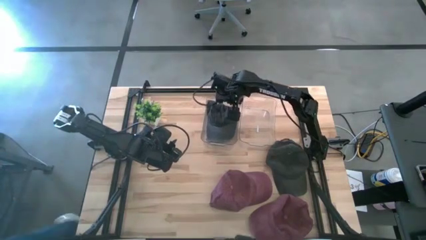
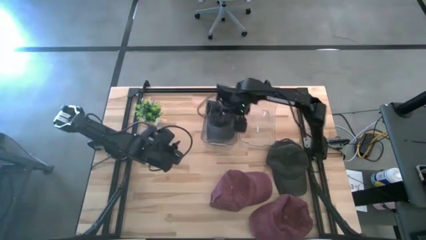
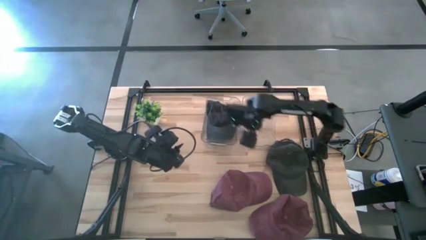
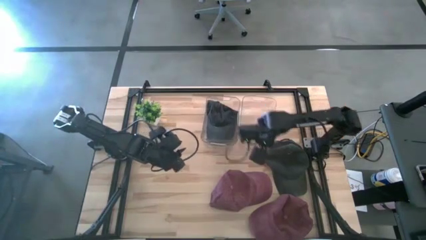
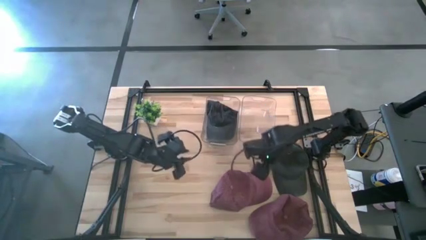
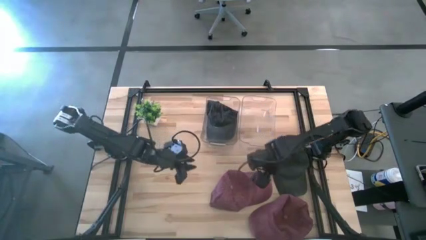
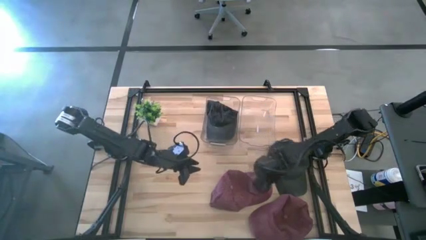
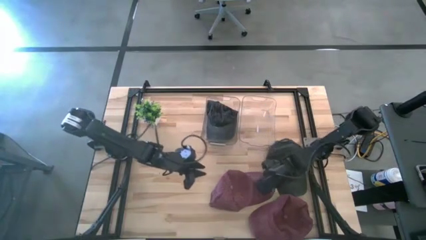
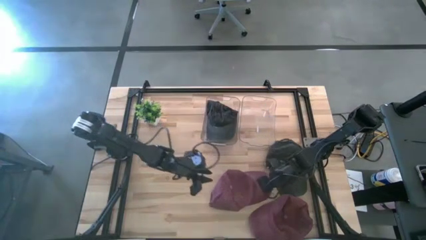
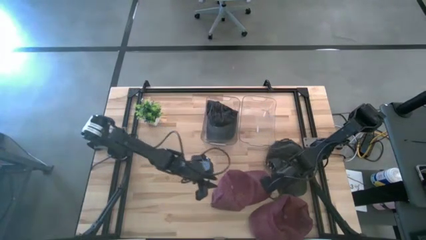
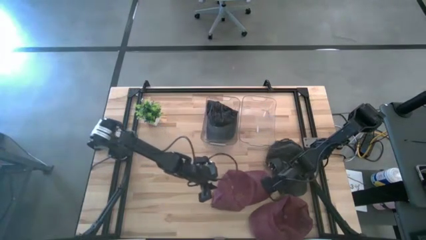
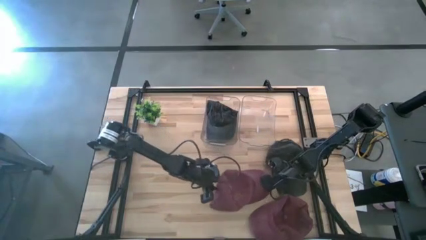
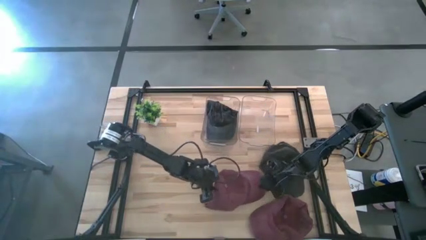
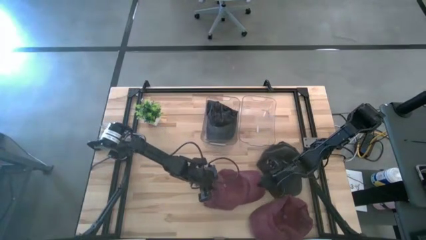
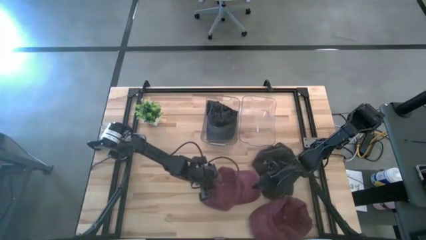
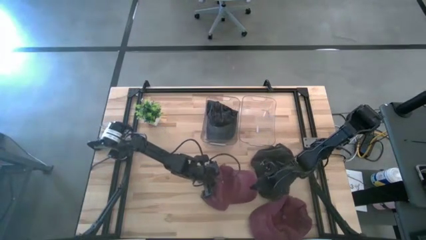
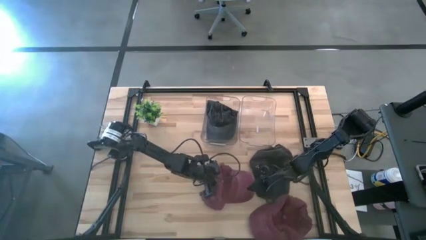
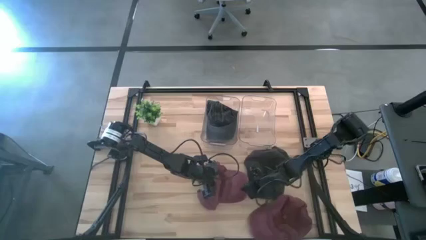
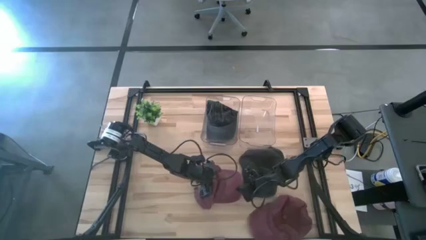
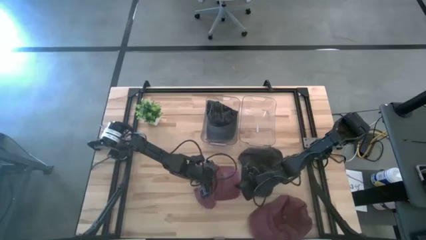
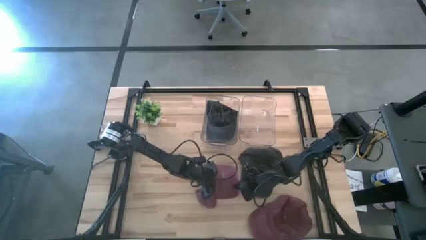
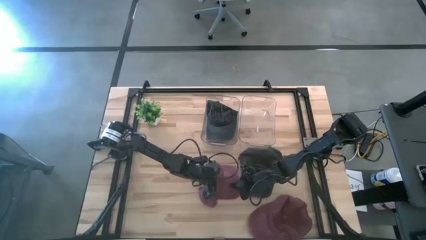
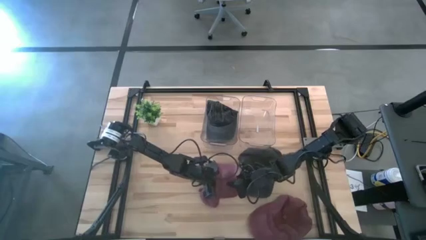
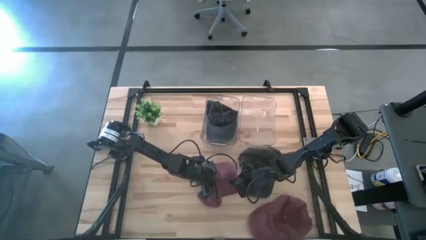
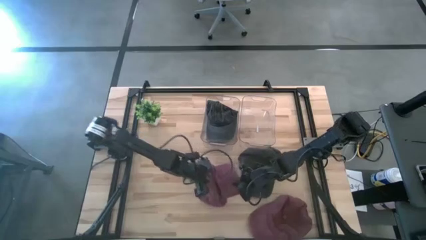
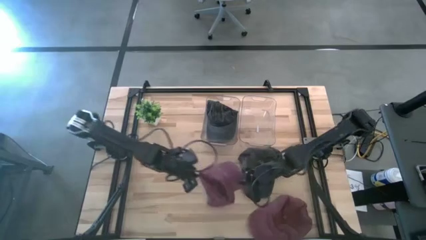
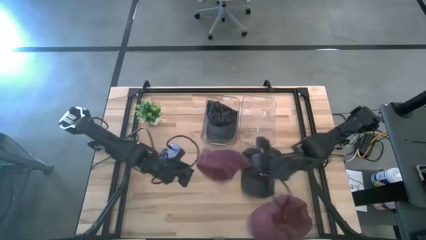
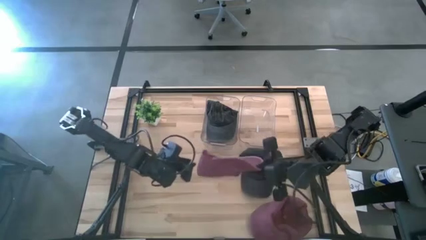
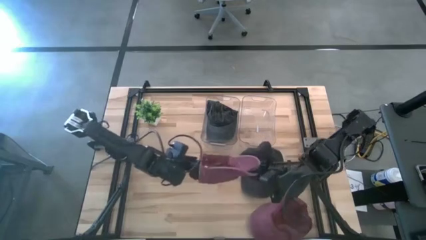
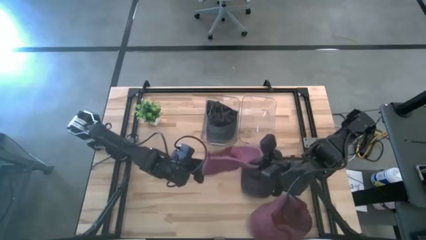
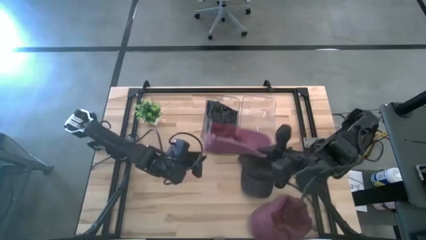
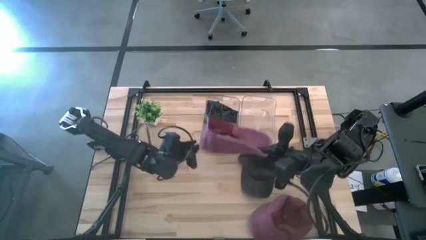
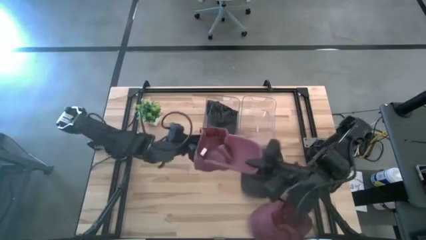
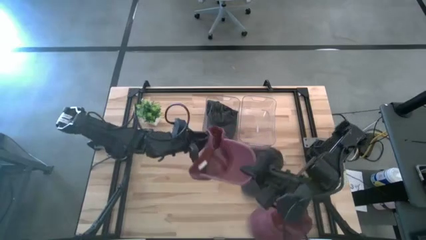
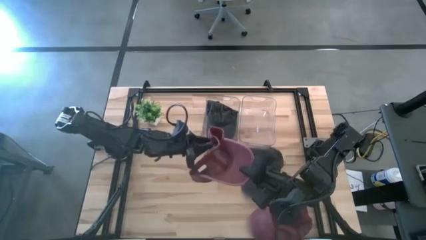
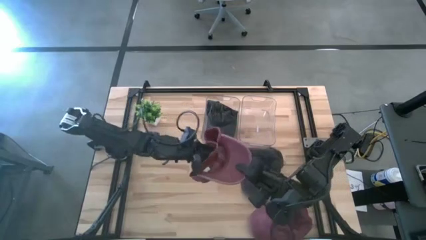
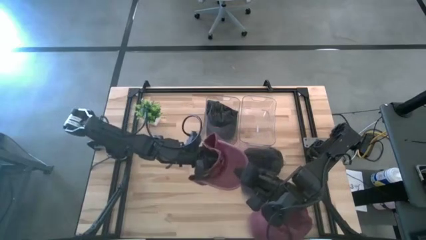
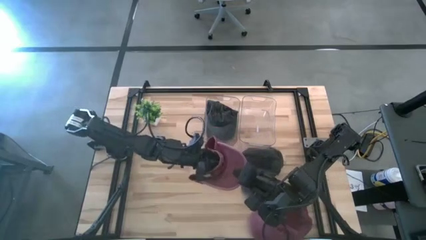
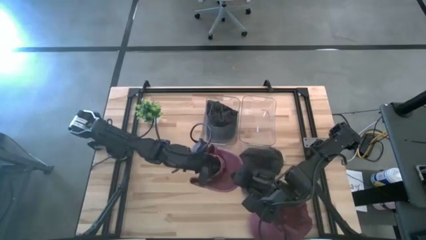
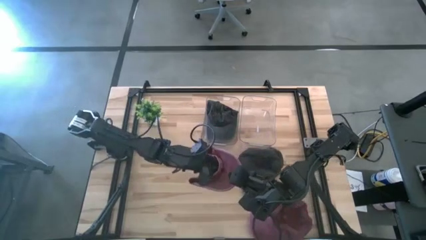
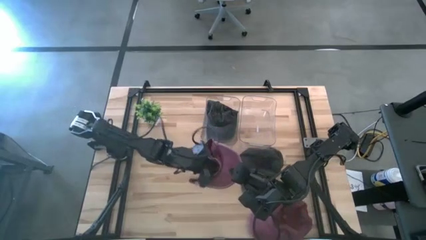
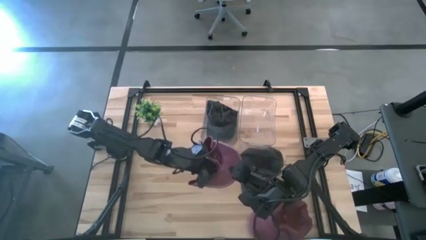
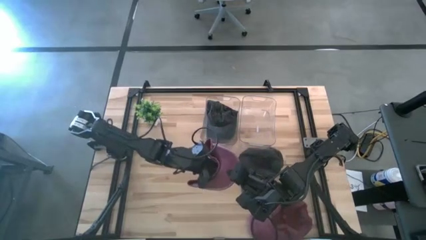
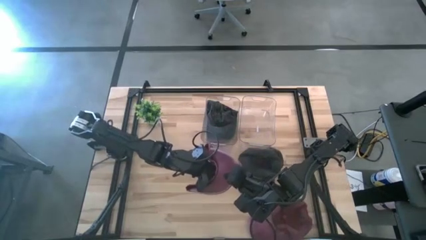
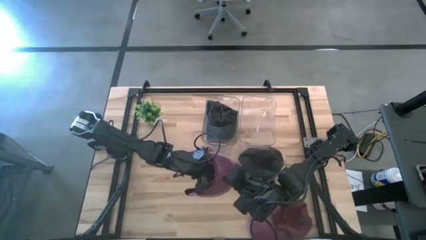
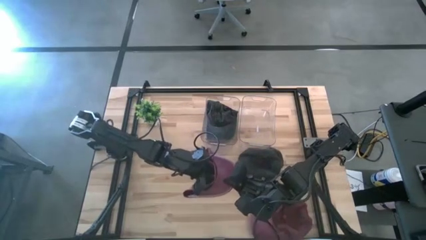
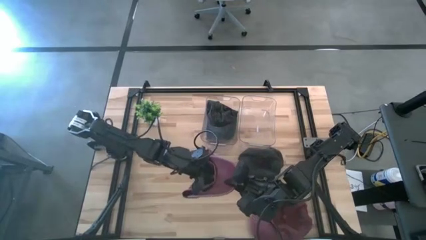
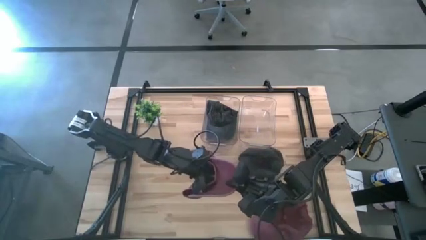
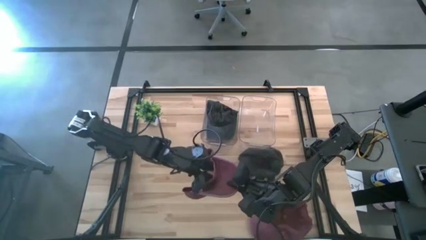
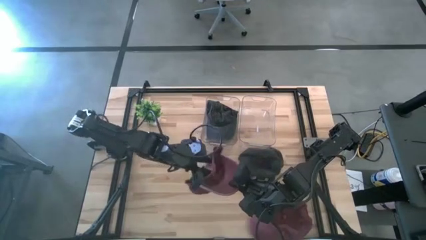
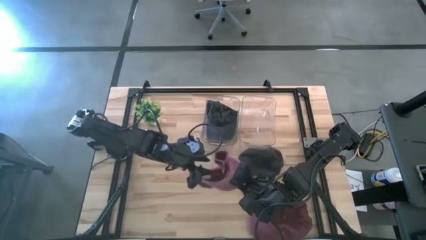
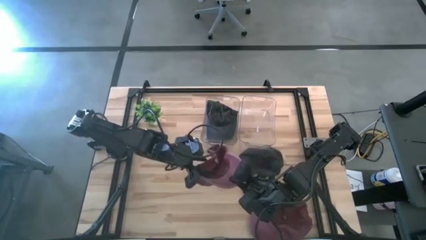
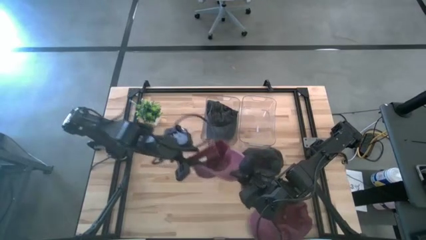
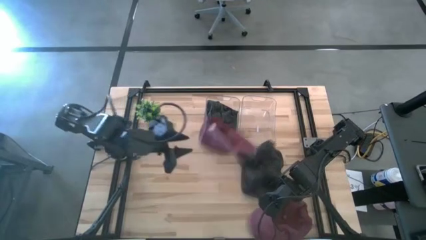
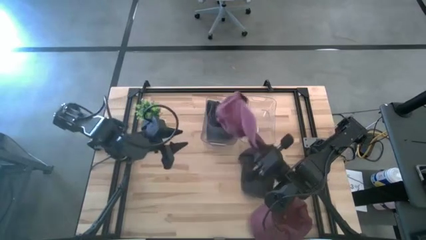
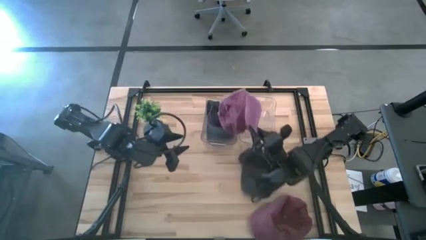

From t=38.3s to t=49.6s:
Task: Pick & Place hat
Put the red cap into the right transparent bin

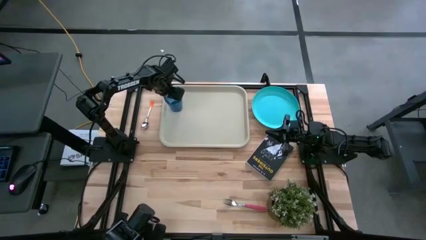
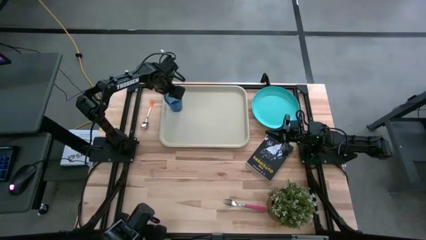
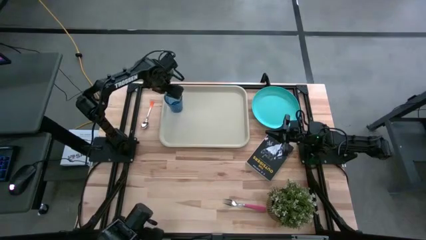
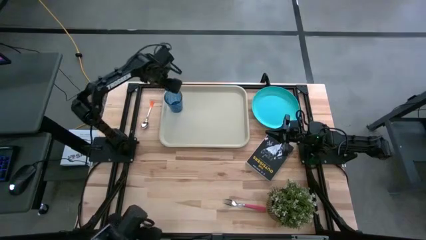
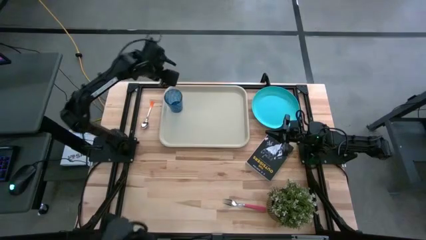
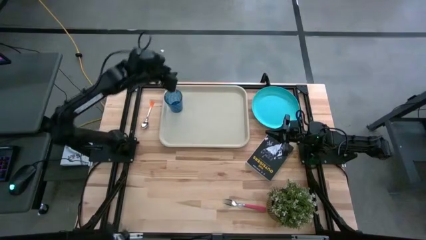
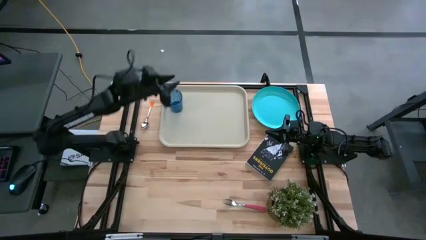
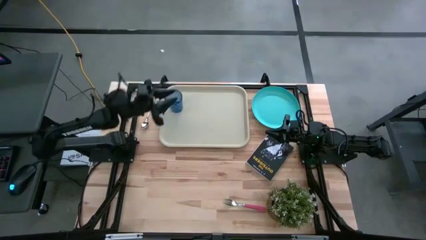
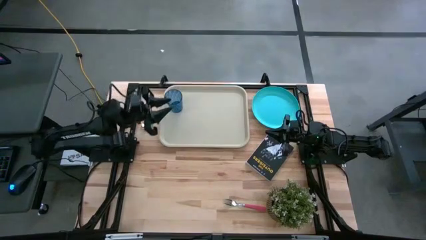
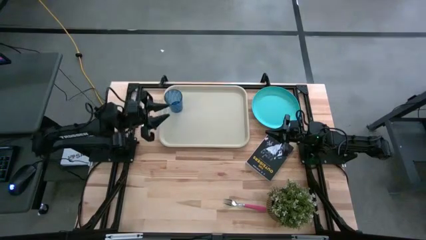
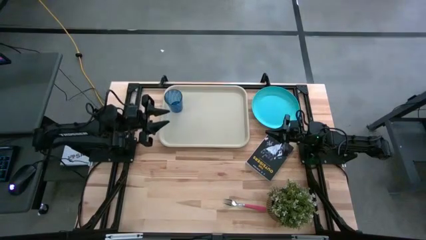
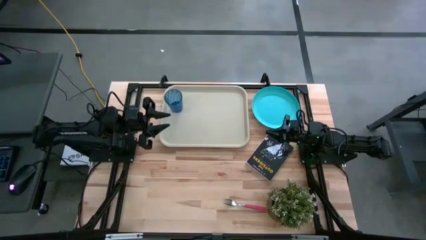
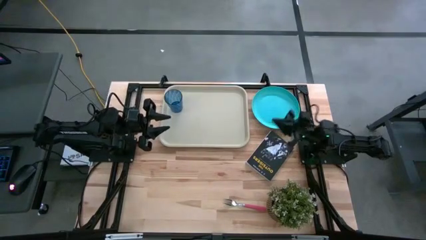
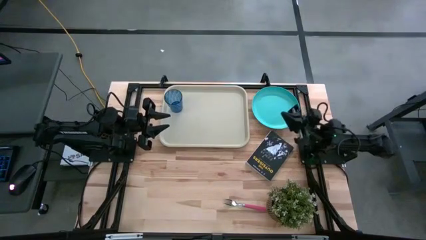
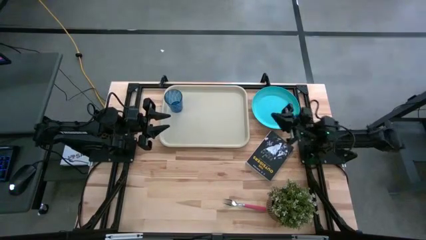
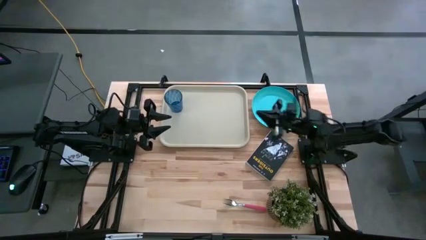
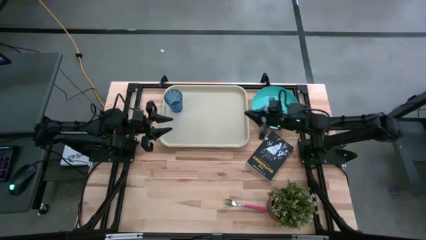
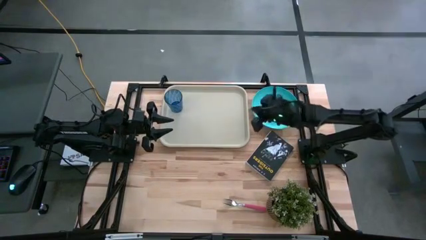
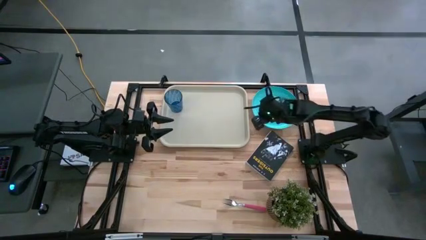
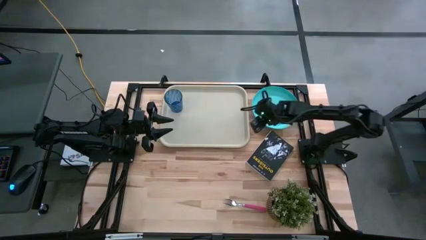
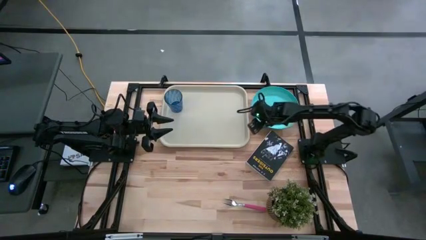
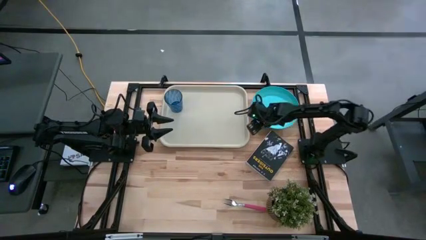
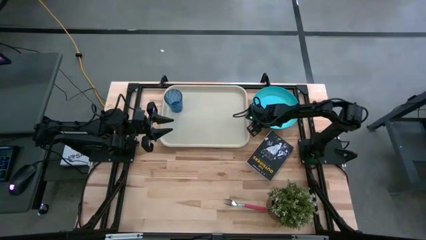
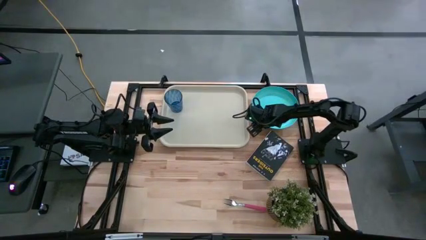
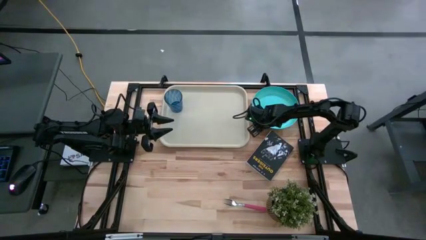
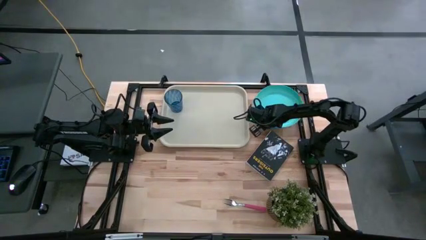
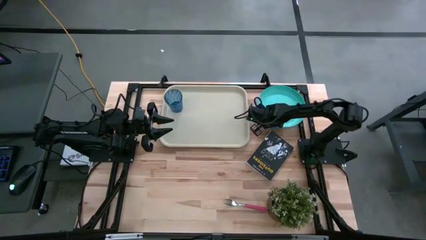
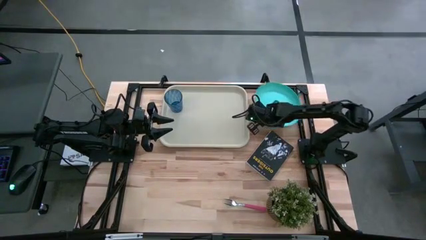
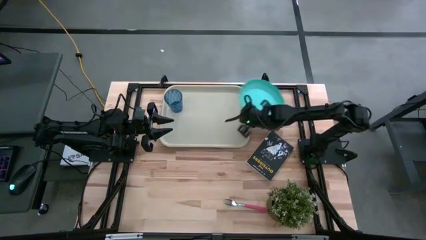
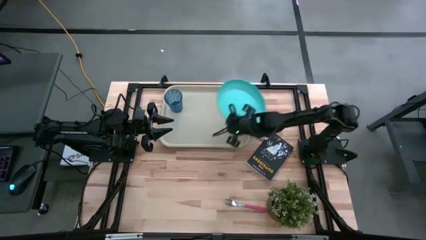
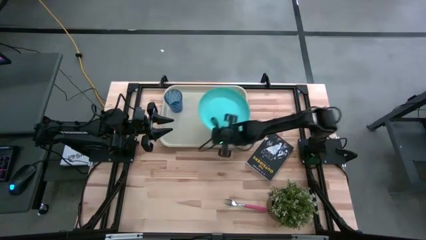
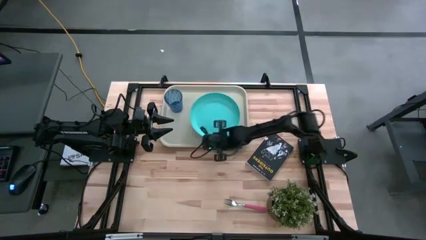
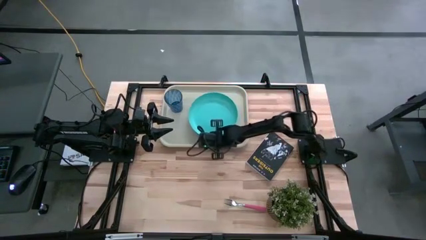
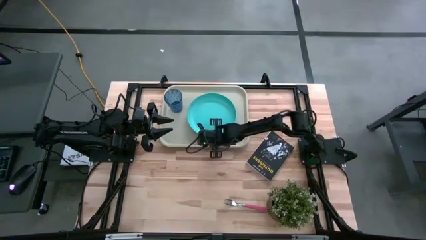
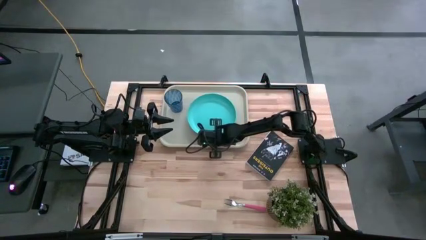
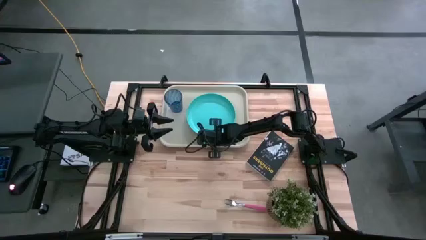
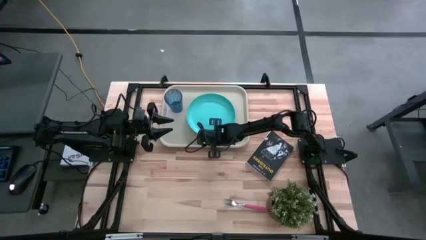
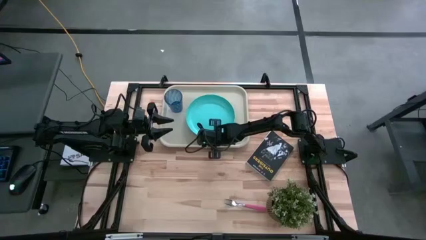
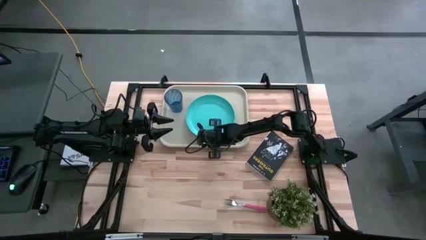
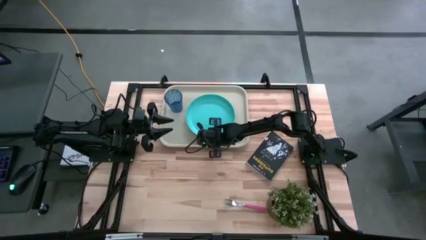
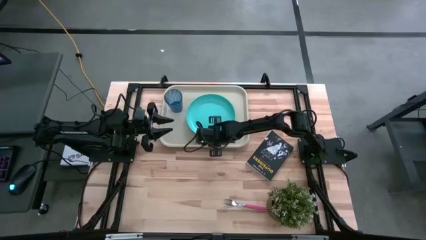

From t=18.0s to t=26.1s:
Task: Pick and place plate/cup/fork/spoon on tray
Put the light blue plate on the white tray
